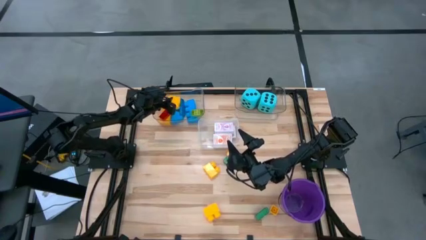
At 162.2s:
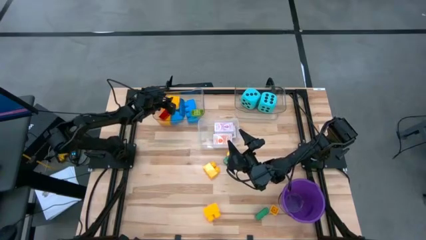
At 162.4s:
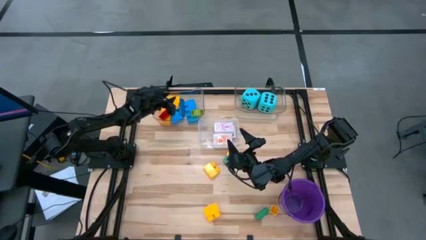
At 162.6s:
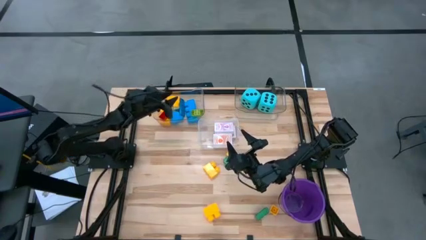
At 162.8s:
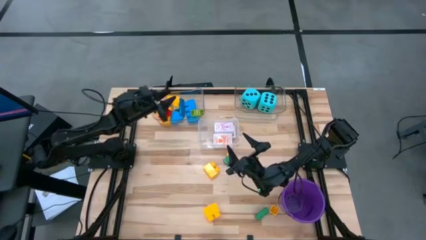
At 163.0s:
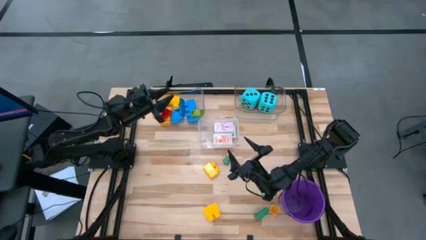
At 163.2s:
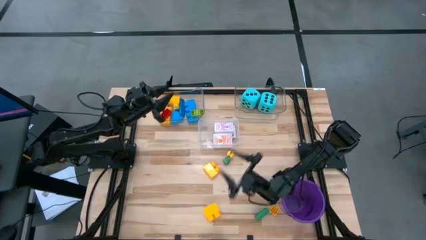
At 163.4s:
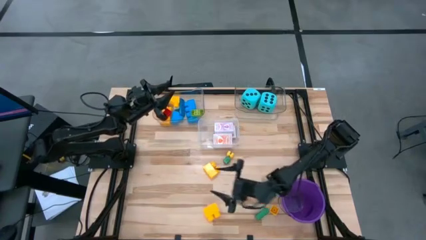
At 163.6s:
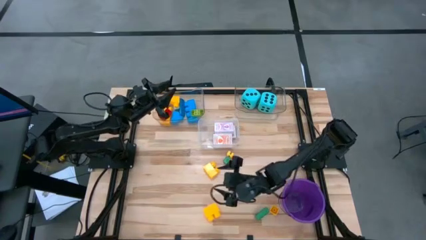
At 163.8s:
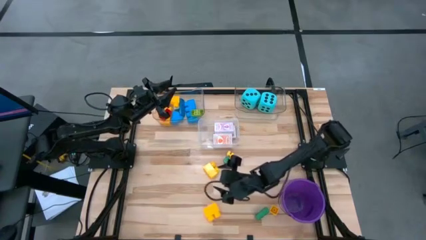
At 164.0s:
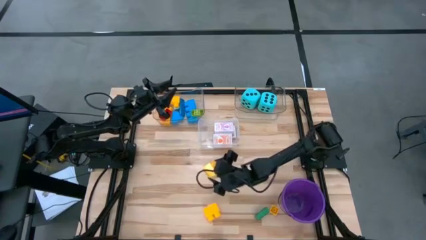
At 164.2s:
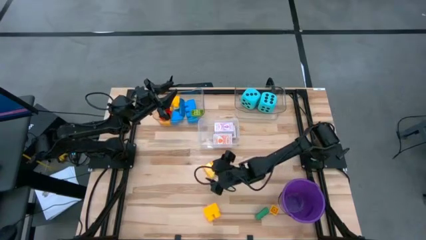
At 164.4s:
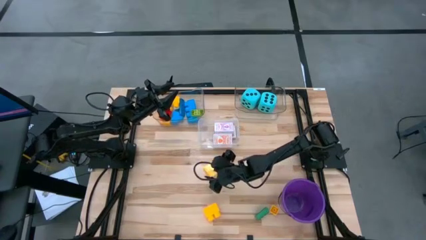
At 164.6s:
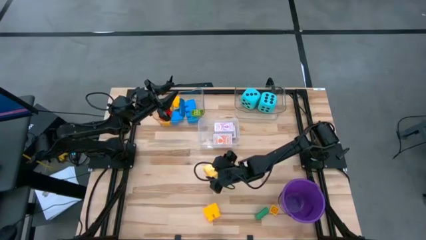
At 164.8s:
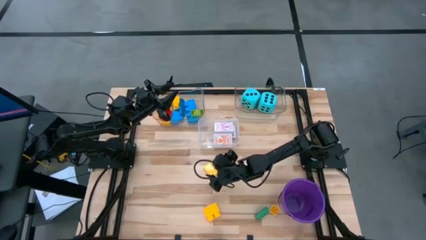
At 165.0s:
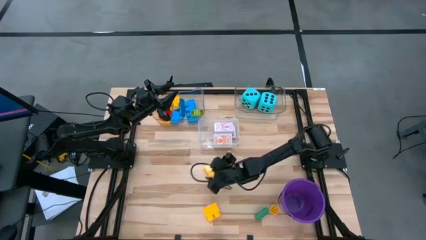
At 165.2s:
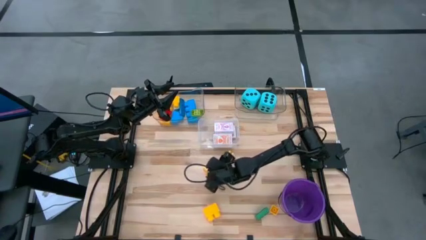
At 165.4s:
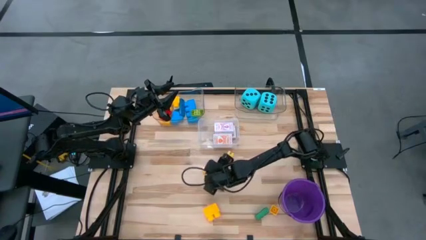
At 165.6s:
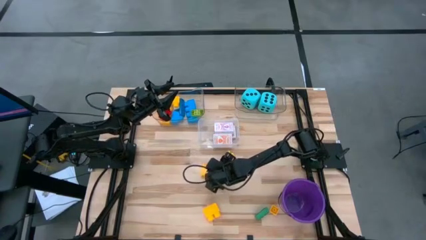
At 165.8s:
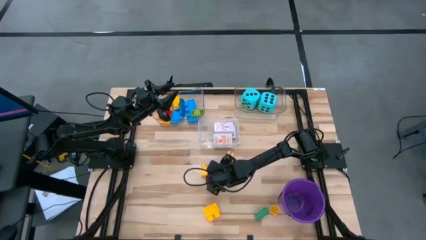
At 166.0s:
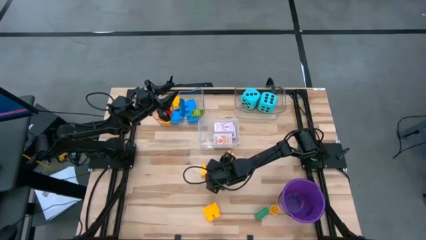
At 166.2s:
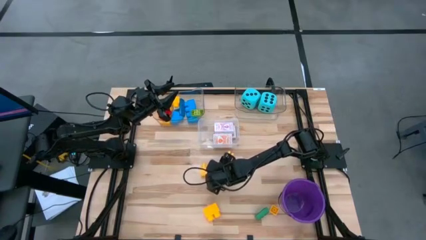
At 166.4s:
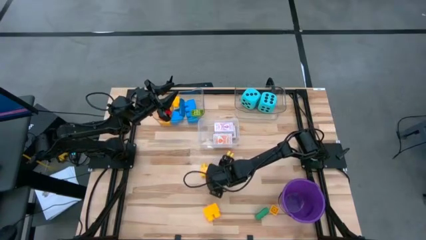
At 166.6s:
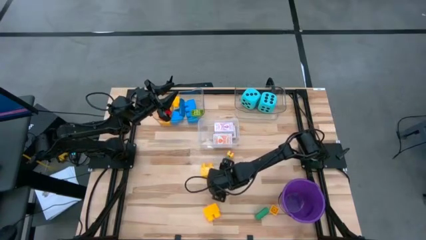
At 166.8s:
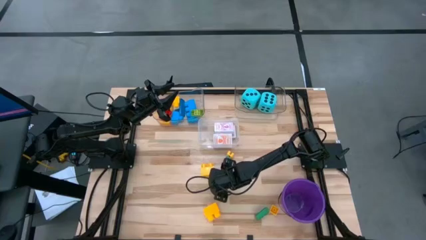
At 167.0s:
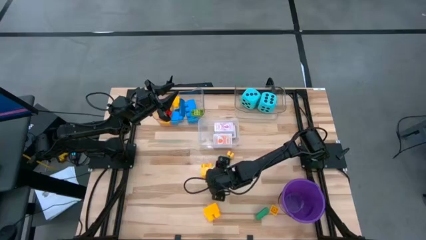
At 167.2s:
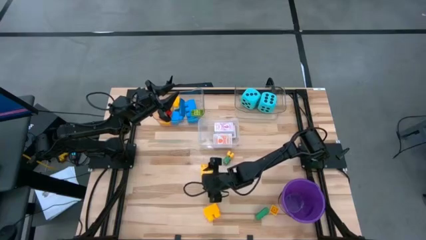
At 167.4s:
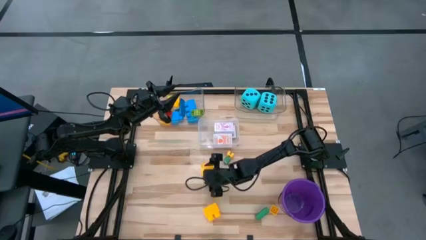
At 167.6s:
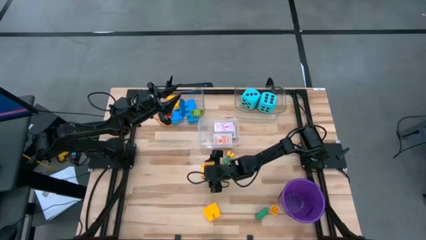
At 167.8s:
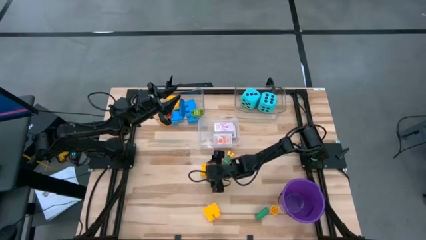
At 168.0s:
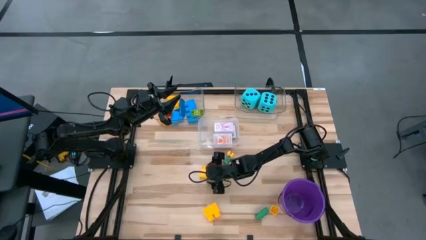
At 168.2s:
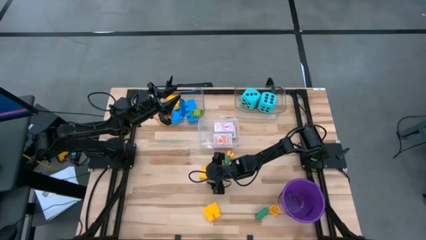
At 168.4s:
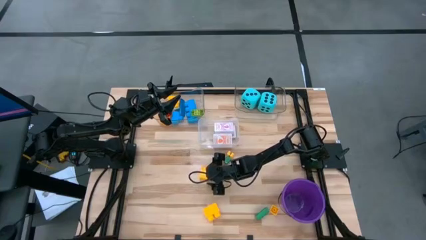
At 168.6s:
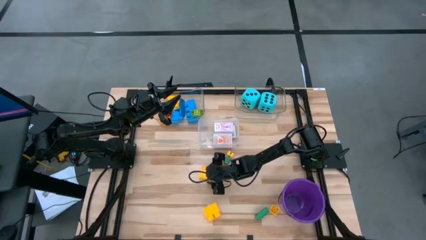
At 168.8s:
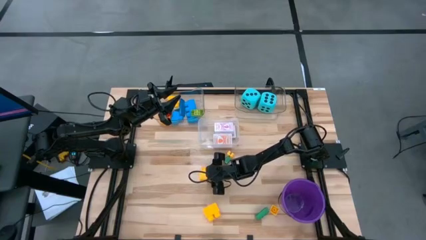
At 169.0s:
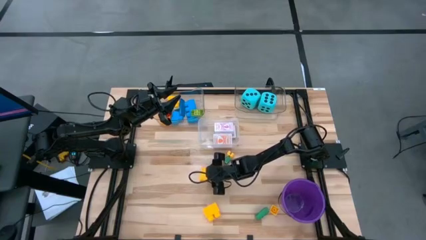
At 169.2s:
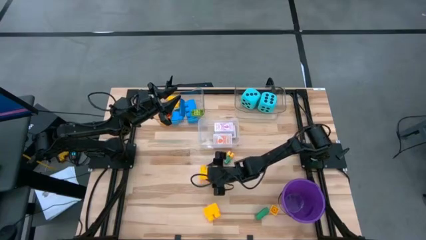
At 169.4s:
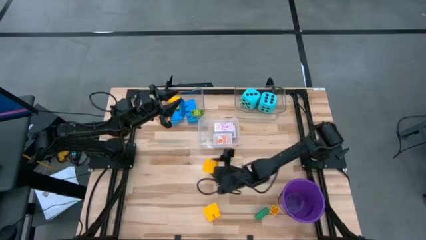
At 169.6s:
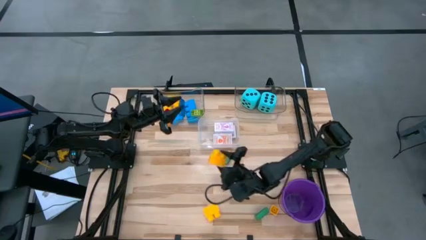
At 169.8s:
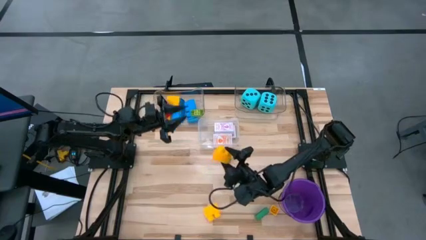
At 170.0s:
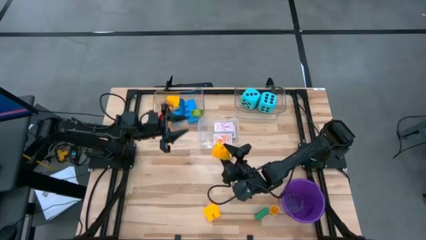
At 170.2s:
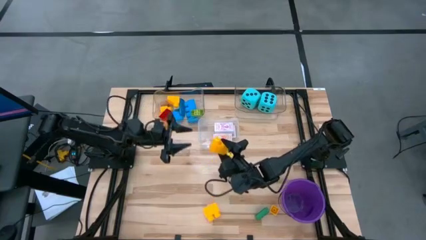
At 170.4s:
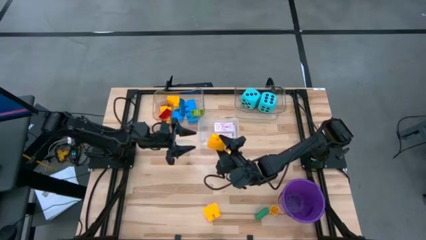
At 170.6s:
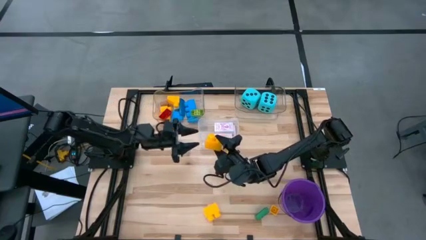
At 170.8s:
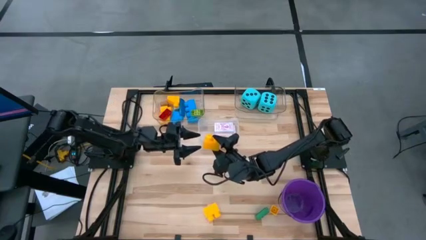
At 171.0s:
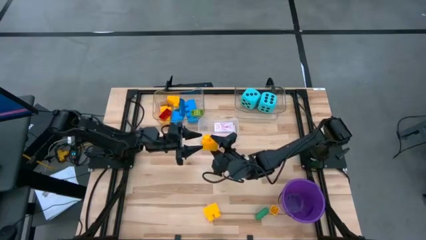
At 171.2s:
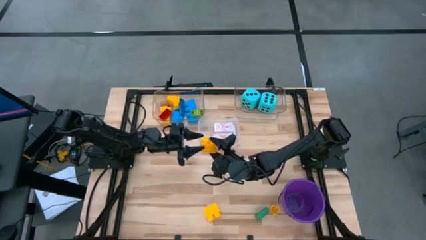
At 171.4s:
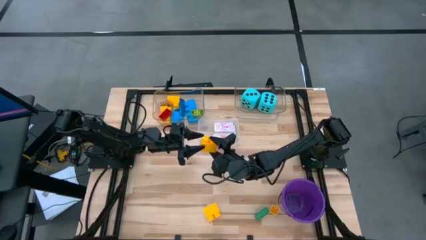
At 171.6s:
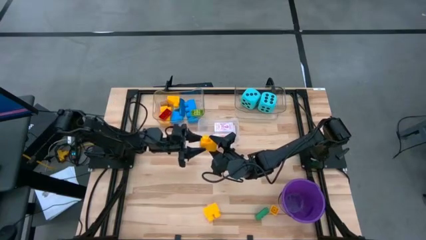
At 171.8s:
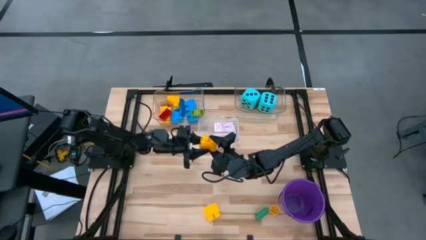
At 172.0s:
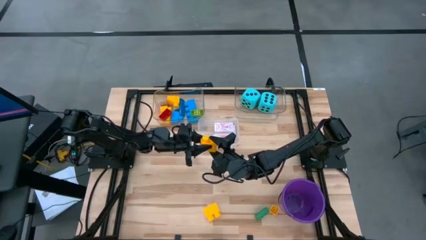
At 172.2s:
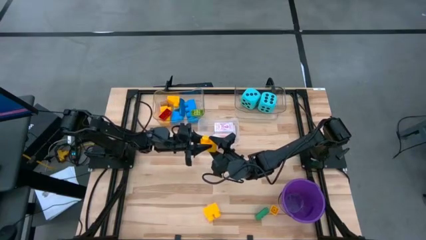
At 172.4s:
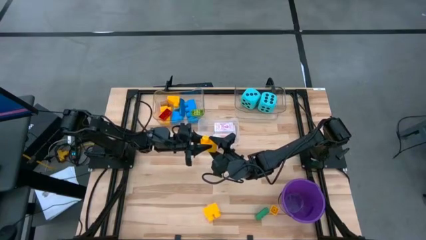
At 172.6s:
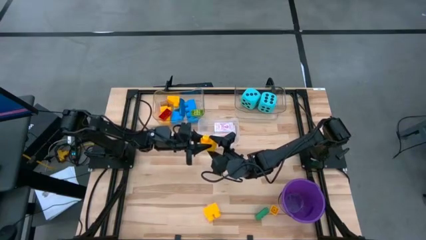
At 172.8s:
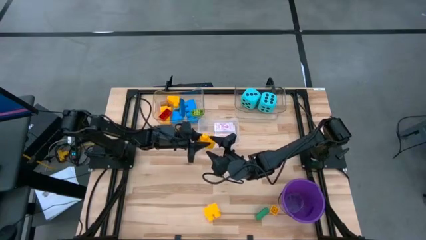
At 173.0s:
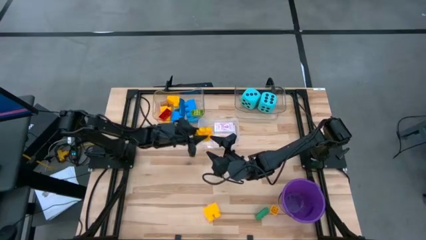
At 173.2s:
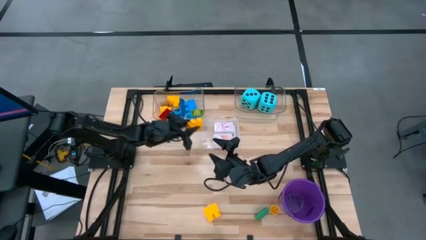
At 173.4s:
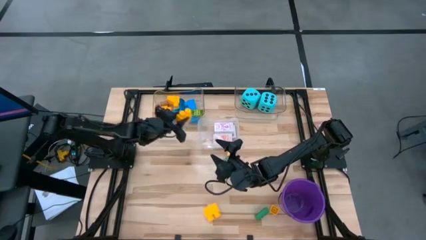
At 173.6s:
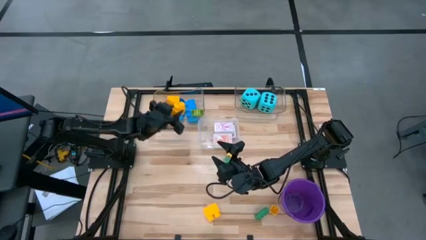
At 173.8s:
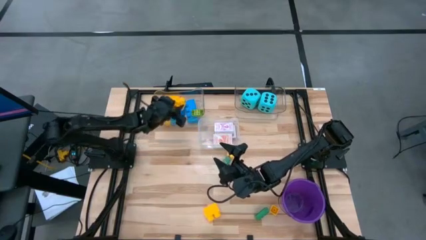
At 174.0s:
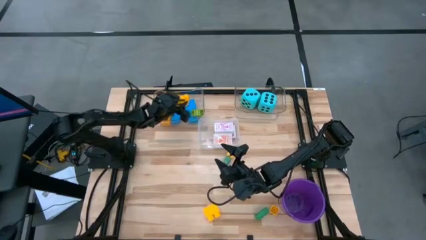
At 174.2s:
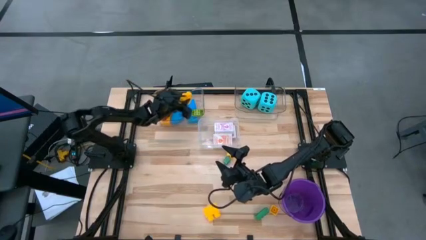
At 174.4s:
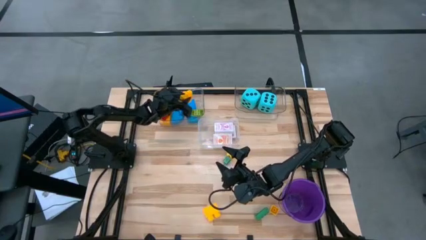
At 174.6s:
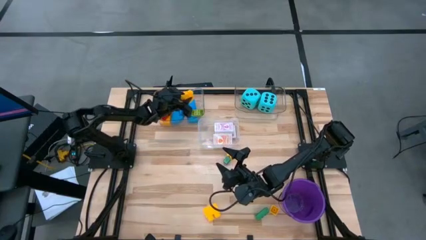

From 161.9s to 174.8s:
Task: Pick & Place Toys
Put the yellow game piece into the top left transparent bin

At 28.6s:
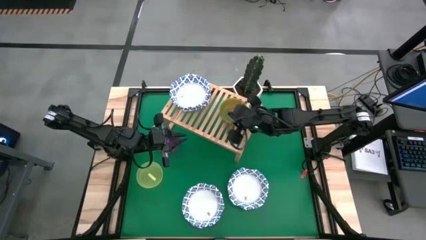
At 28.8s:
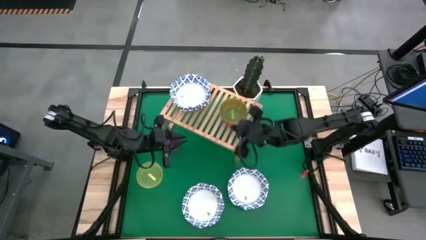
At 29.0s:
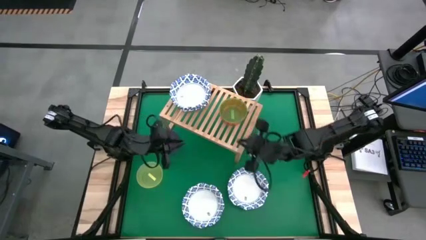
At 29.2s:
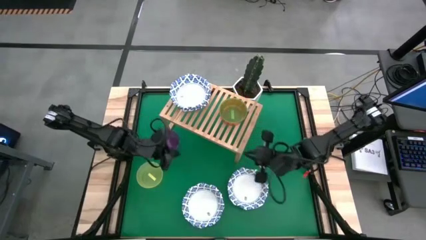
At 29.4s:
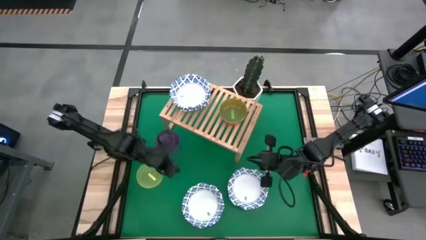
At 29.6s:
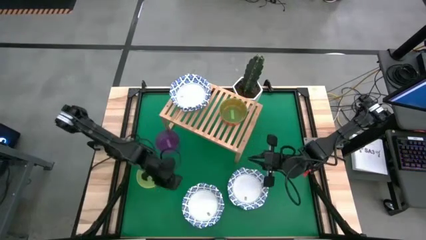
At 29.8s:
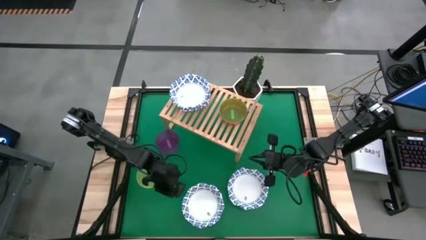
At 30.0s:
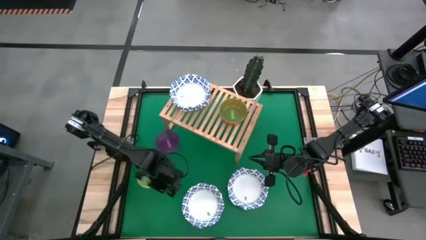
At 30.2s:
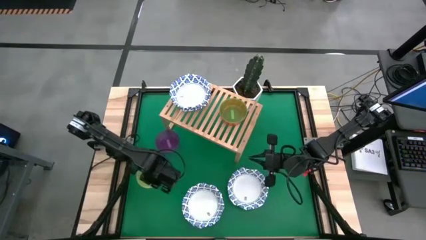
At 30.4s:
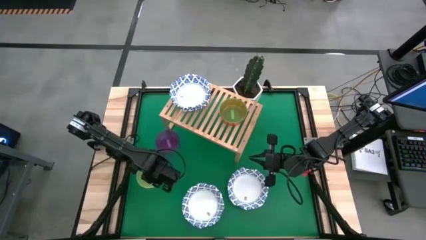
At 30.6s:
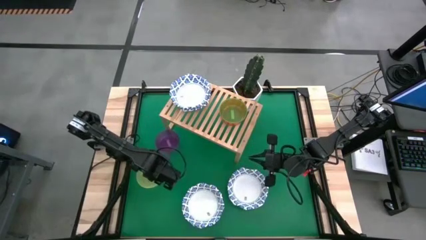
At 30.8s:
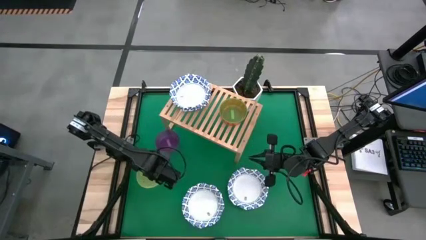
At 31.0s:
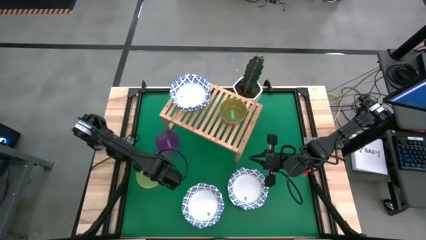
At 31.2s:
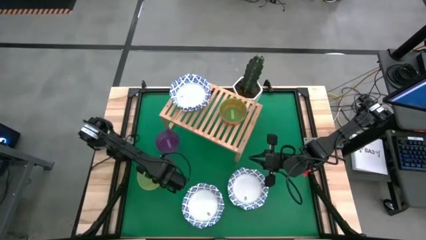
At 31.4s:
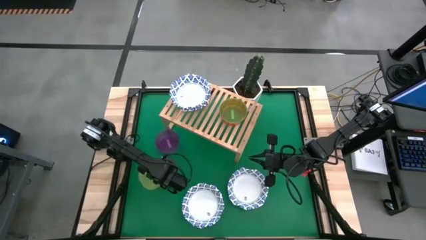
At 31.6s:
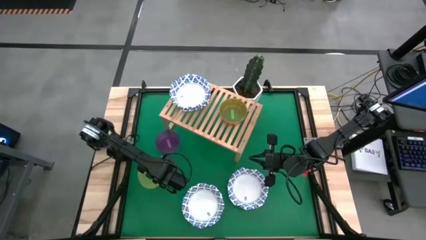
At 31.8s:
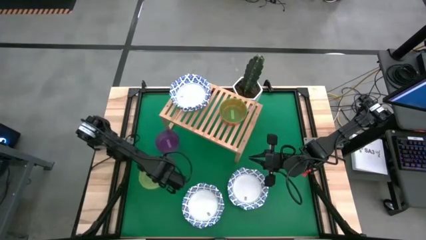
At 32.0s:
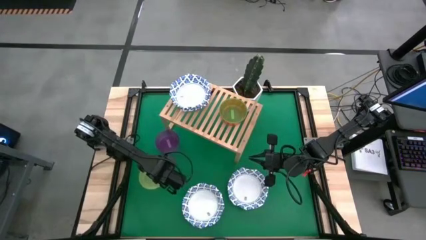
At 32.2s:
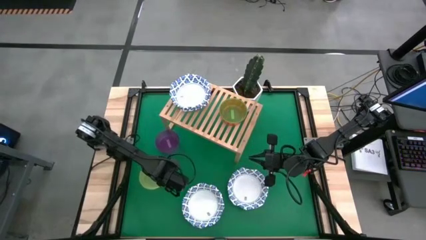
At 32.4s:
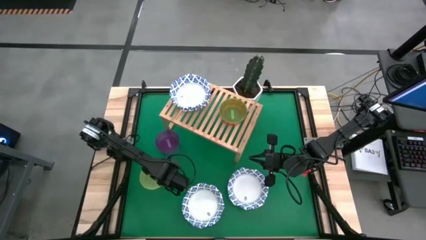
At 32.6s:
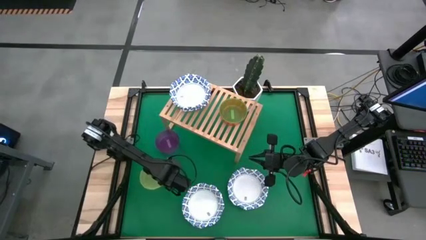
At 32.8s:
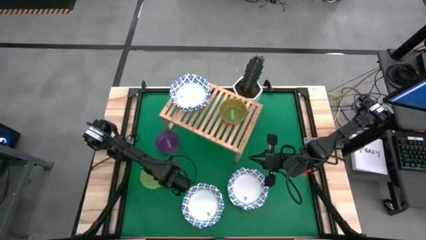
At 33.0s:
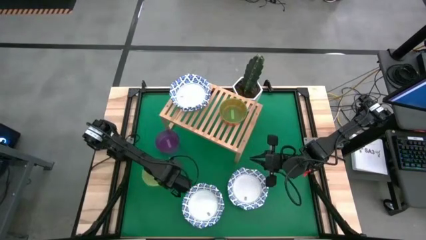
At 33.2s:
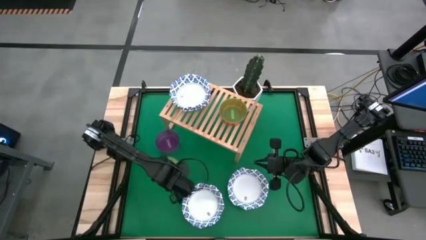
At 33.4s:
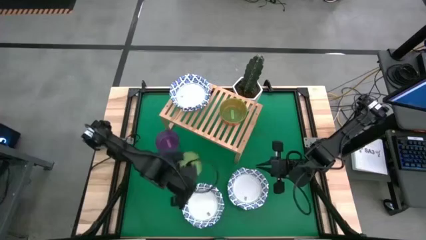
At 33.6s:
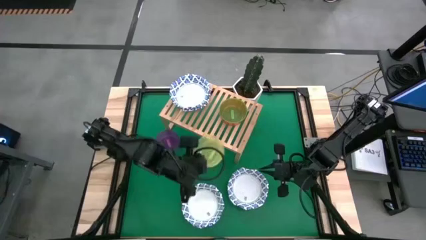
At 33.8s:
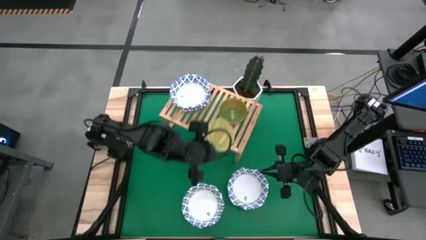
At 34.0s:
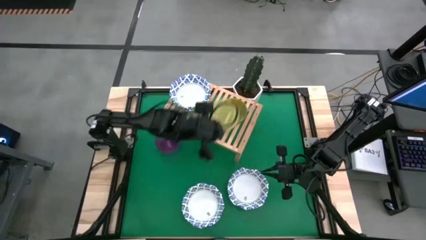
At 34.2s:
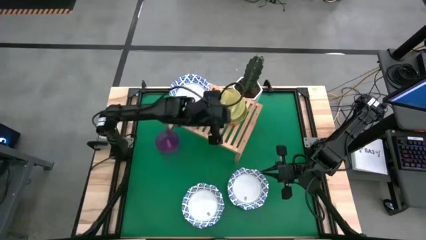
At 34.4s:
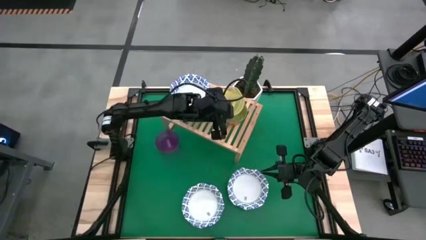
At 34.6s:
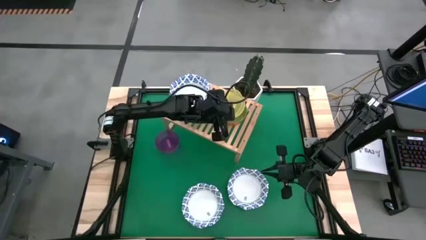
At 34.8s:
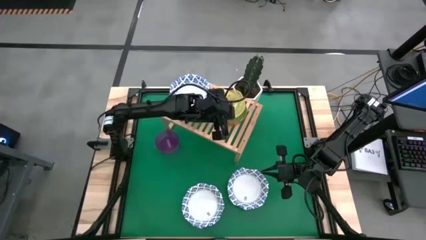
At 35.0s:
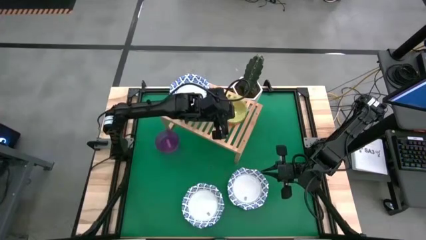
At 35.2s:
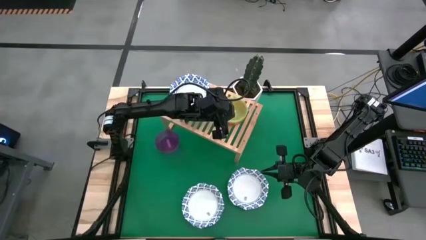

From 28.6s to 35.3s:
Task: Place and stack bowls onto a shelf
Stack the yellow bowl on top of the green bowl on the shelf
